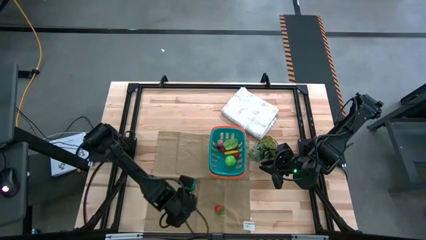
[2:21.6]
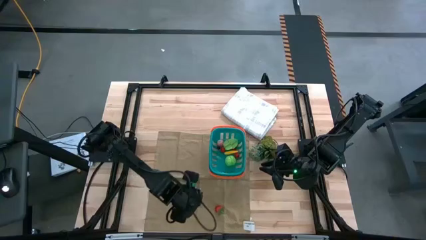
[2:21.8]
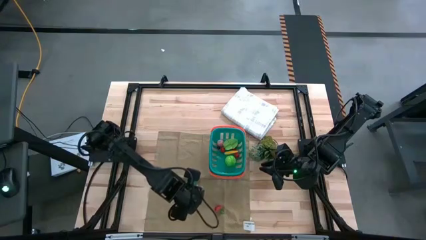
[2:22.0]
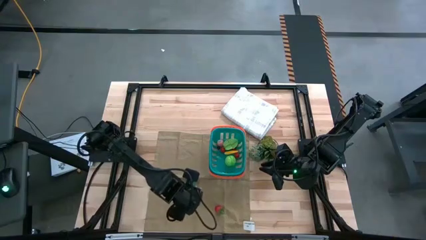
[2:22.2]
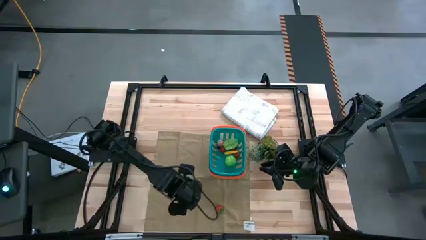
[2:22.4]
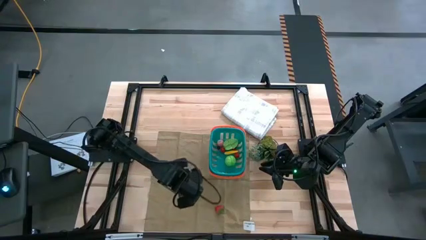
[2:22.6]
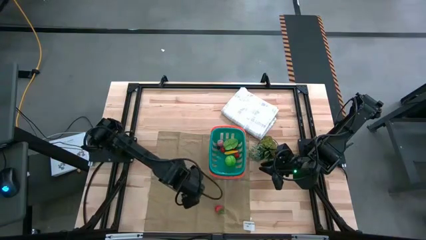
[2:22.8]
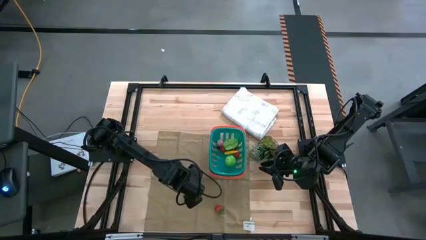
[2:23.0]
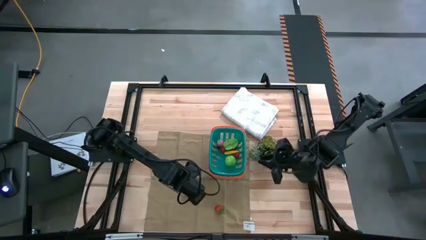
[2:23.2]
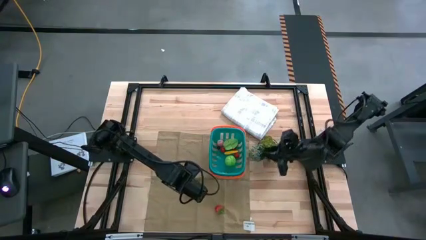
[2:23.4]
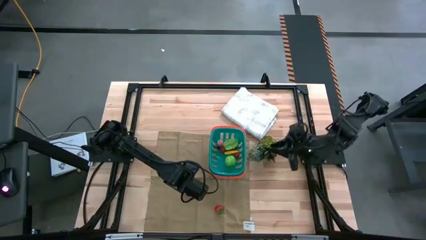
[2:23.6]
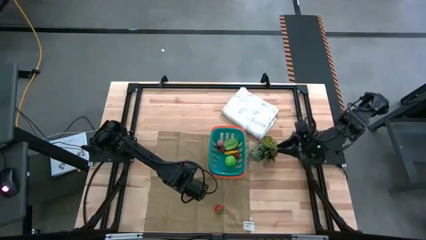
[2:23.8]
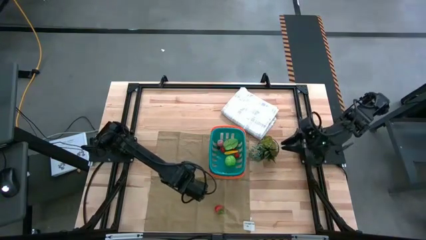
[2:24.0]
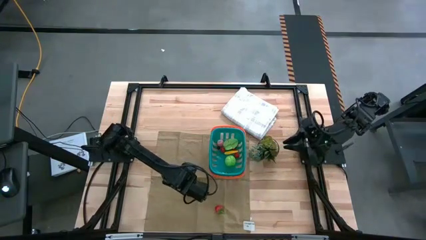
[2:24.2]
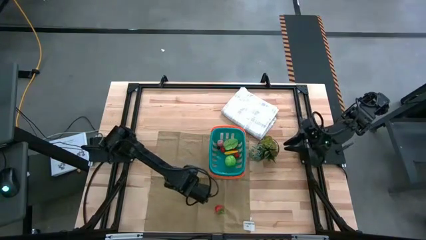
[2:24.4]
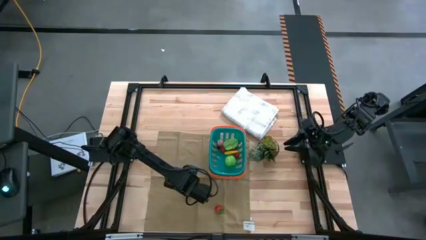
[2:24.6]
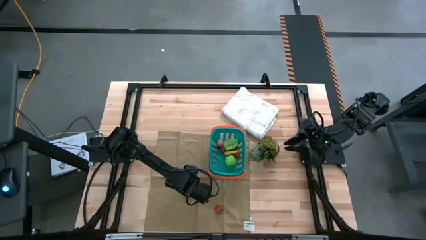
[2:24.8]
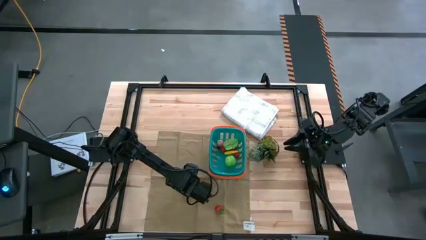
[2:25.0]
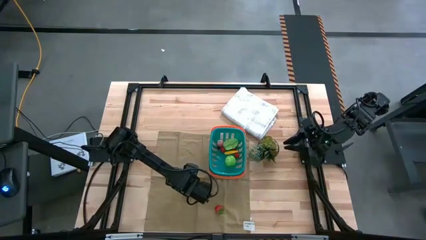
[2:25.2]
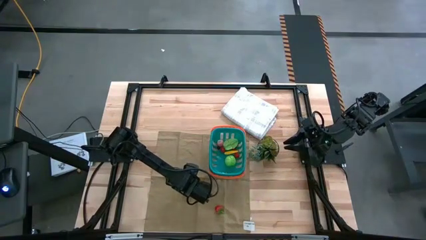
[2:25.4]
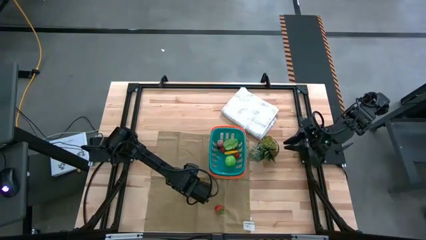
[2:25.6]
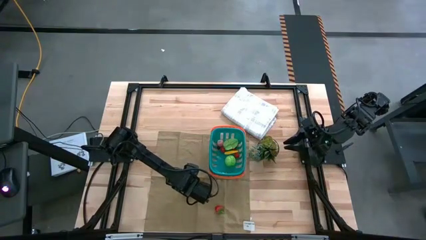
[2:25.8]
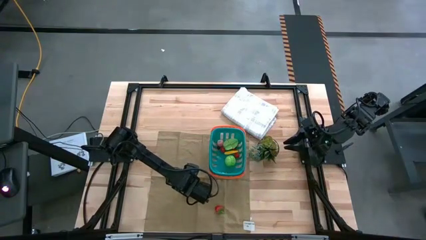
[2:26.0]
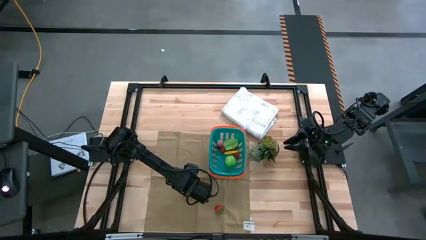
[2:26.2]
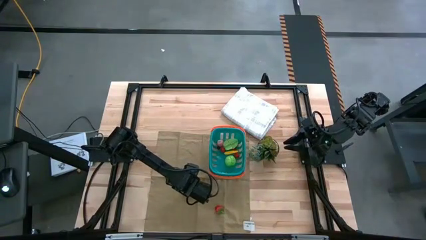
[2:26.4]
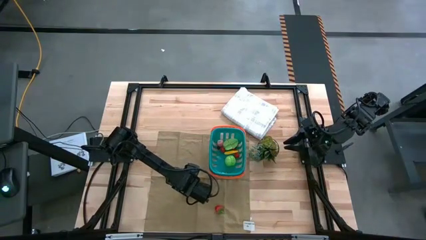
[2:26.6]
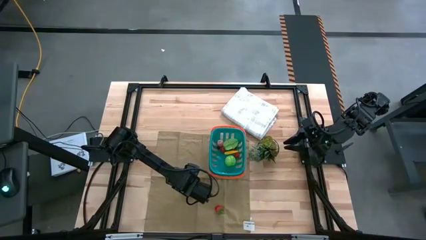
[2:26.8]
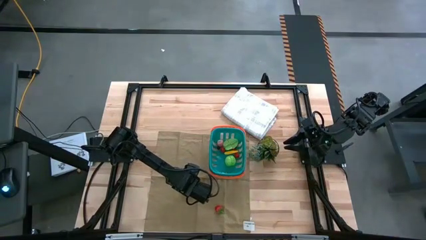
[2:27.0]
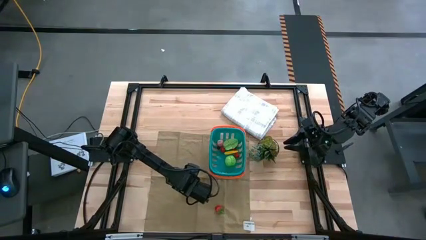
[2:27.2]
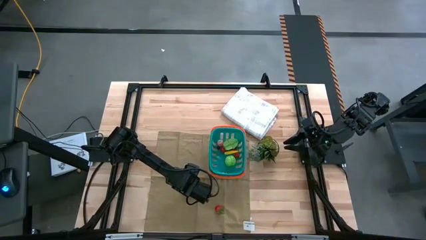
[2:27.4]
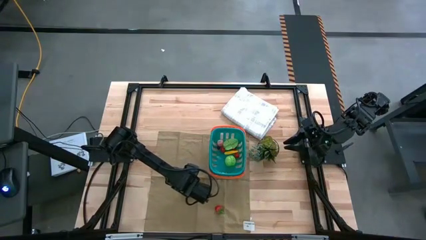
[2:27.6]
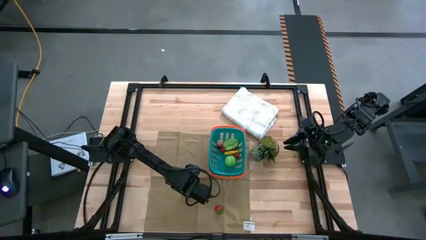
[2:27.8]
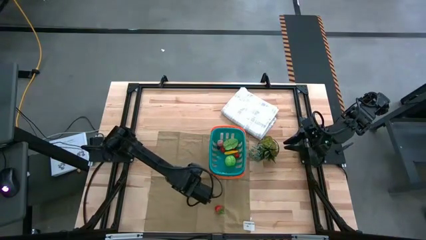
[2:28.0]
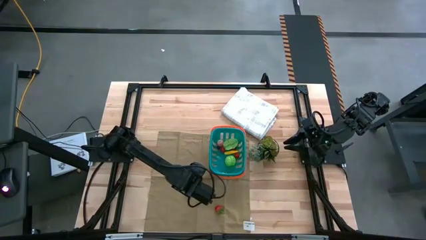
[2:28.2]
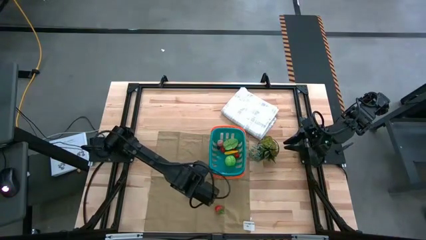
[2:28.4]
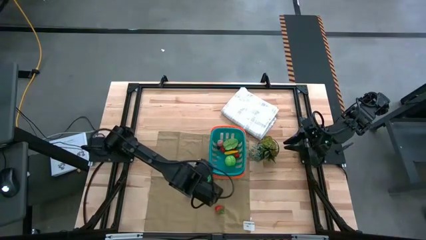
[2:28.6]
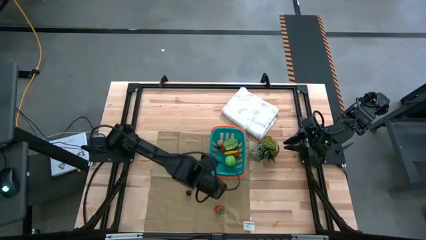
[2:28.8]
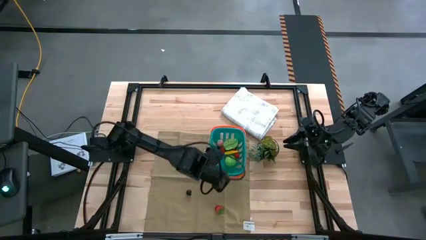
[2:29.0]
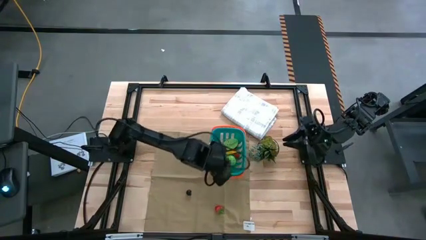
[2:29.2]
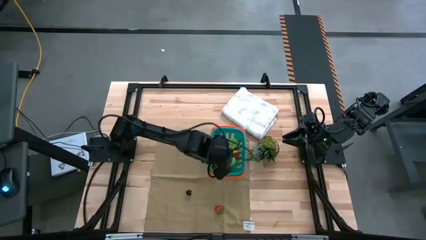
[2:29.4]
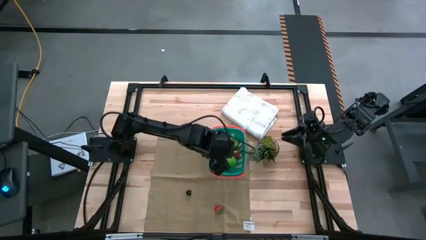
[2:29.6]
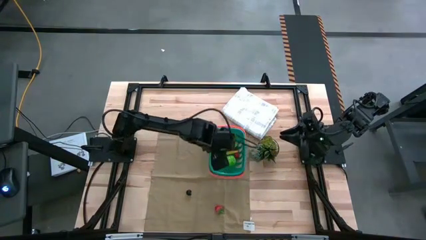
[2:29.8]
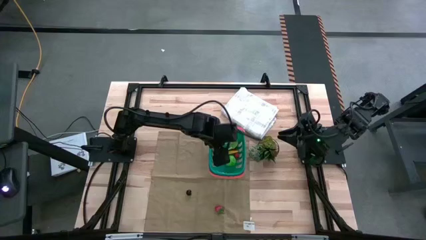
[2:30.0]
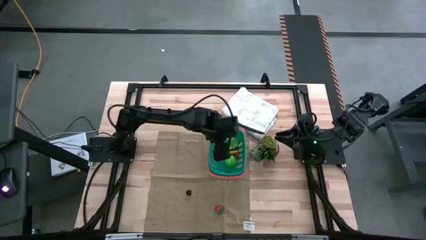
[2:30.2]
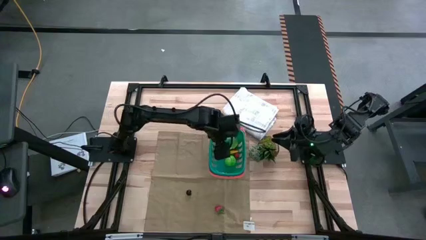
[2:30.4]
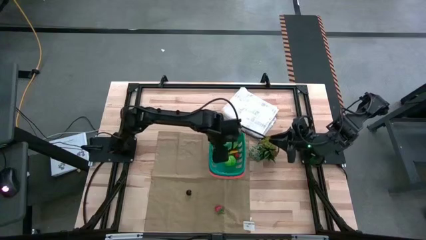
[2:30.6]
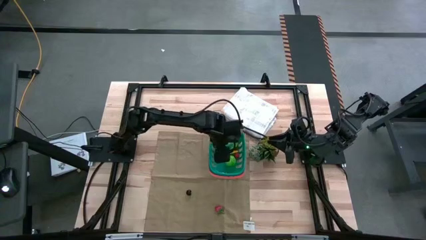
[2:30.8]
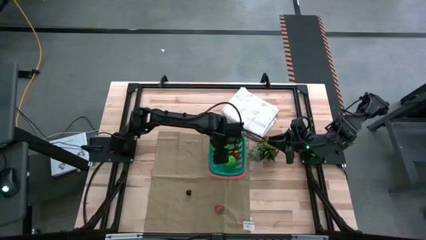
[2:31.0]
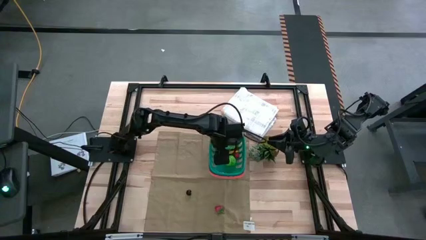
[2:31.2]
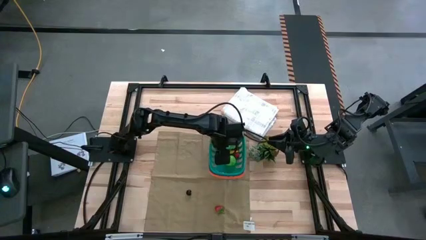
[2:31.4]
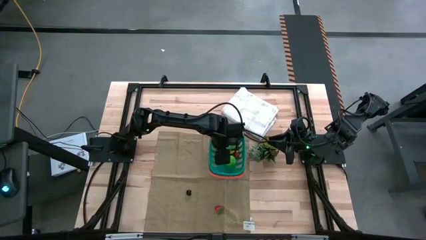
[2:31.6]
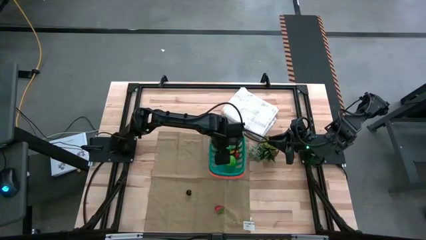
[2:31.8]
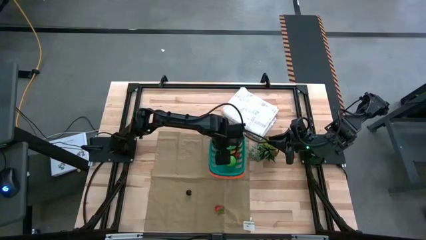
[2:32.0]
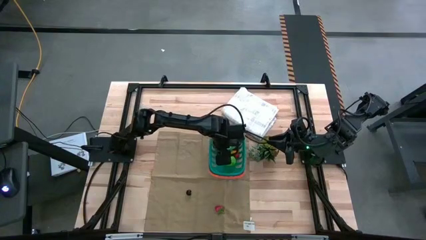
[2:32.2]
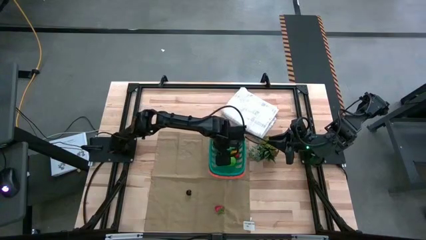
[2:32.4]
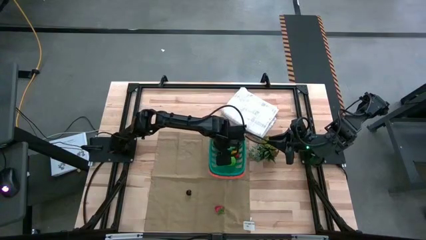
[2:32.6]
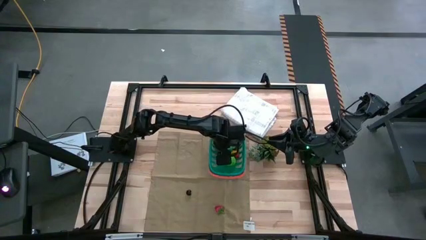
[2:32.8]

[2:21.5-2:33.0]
Task: Pick and placing Produce into tupperware
Put the green bell pepper into the basket
